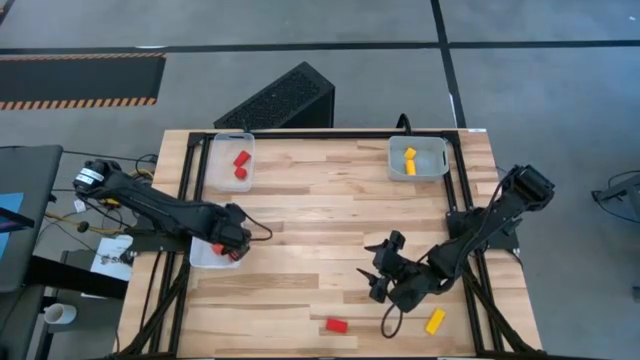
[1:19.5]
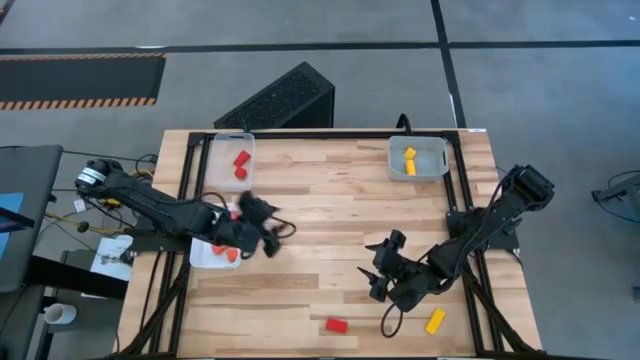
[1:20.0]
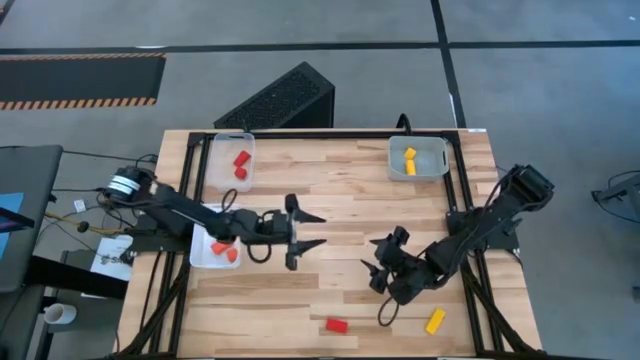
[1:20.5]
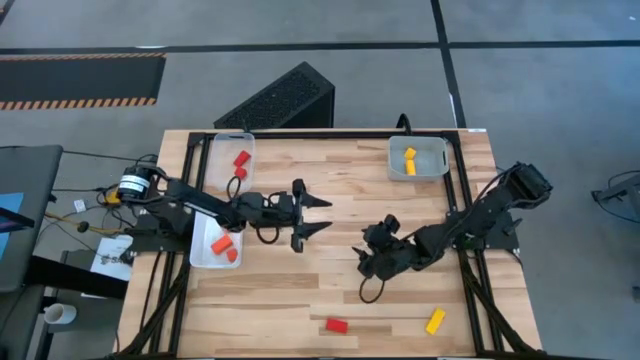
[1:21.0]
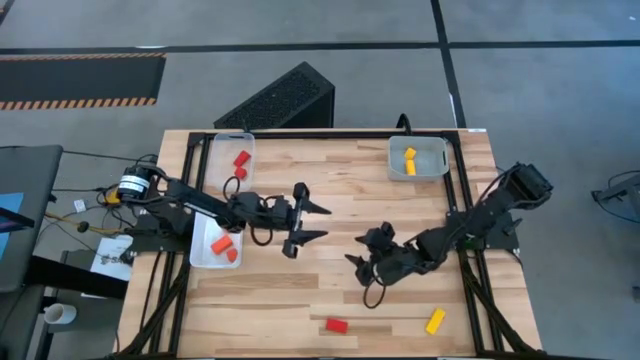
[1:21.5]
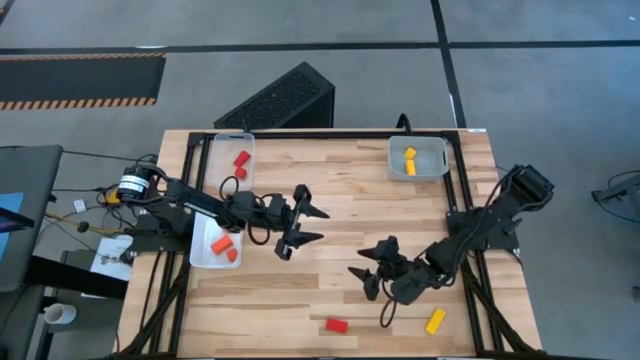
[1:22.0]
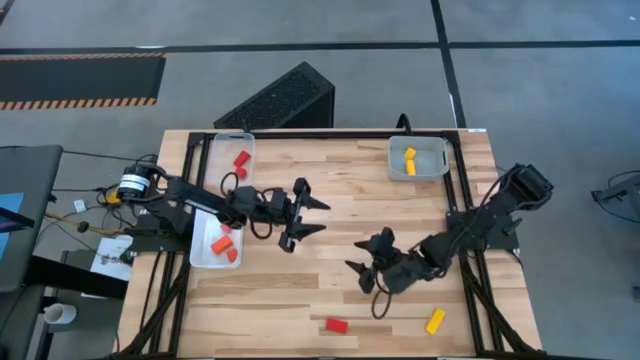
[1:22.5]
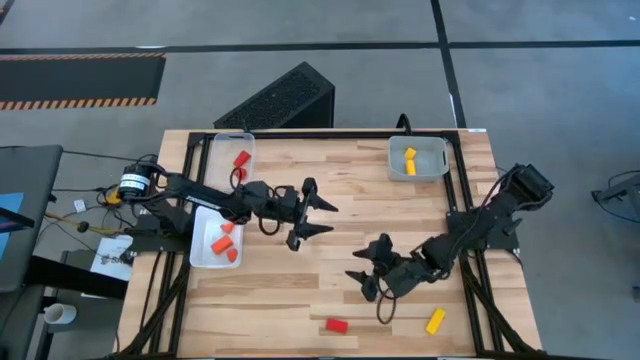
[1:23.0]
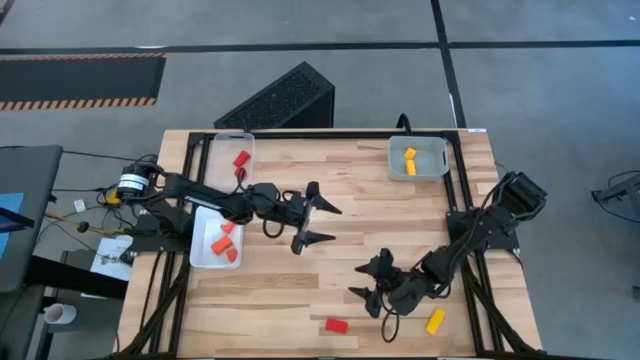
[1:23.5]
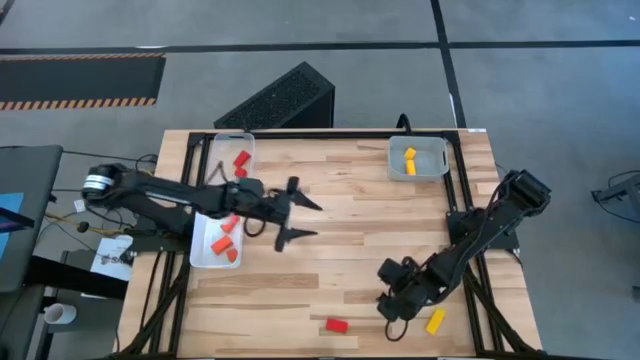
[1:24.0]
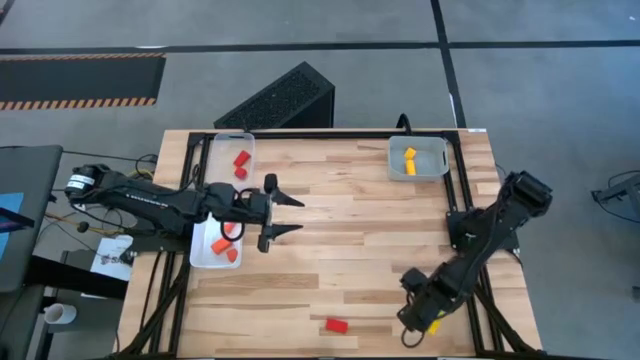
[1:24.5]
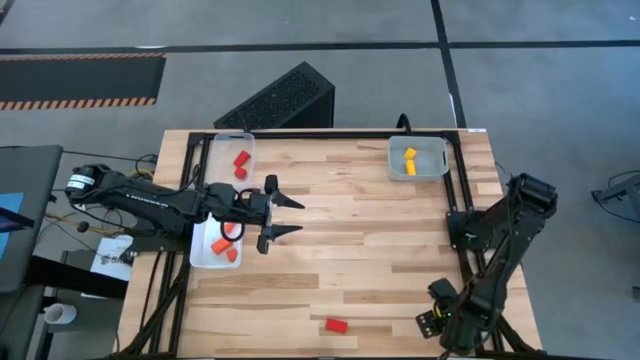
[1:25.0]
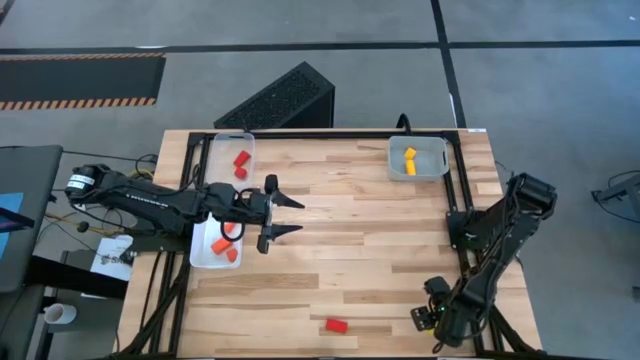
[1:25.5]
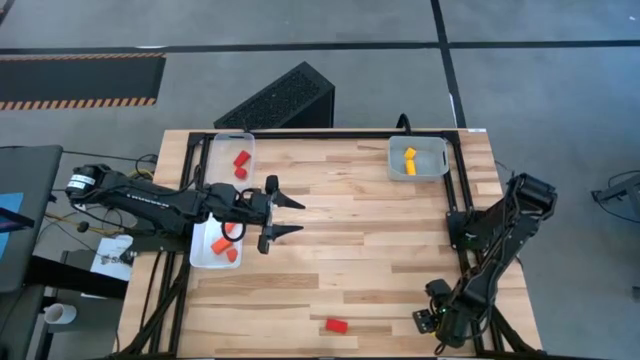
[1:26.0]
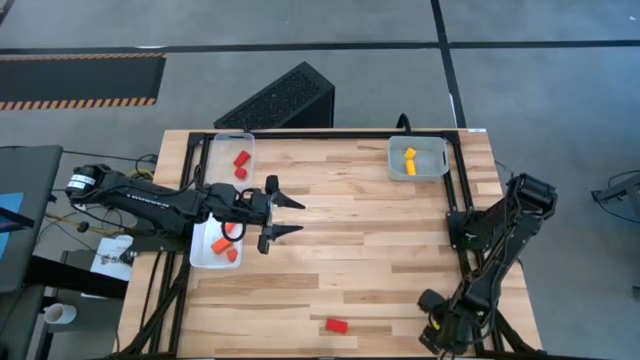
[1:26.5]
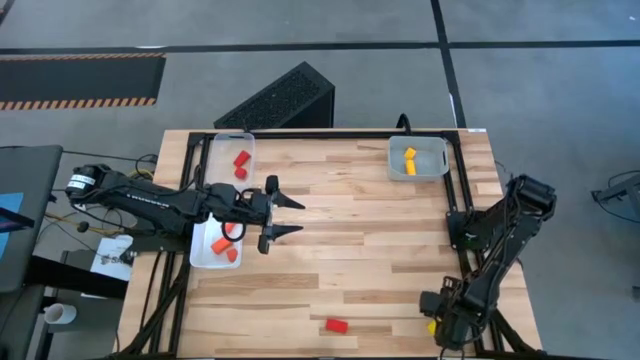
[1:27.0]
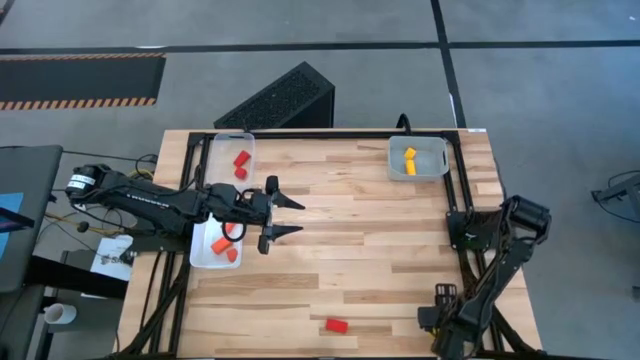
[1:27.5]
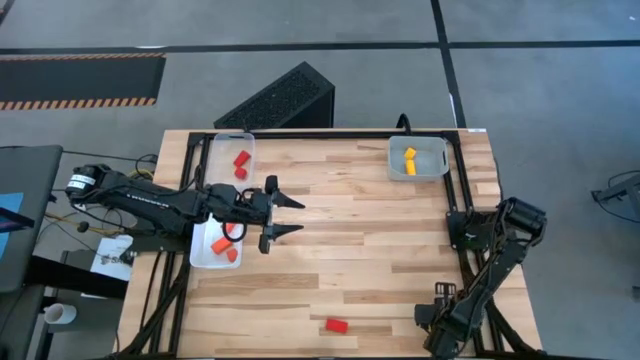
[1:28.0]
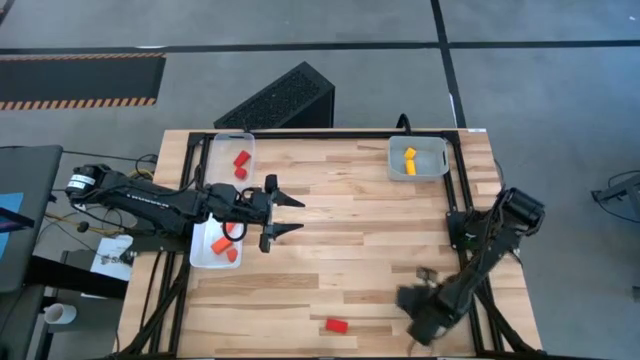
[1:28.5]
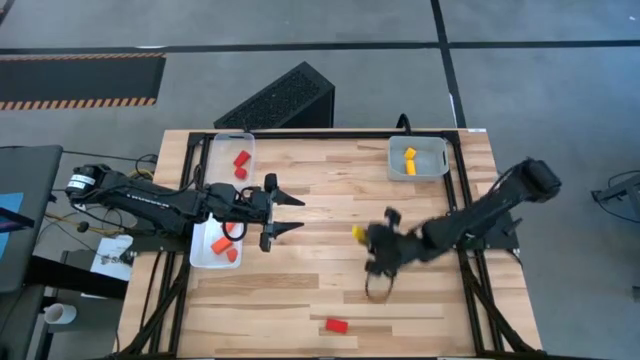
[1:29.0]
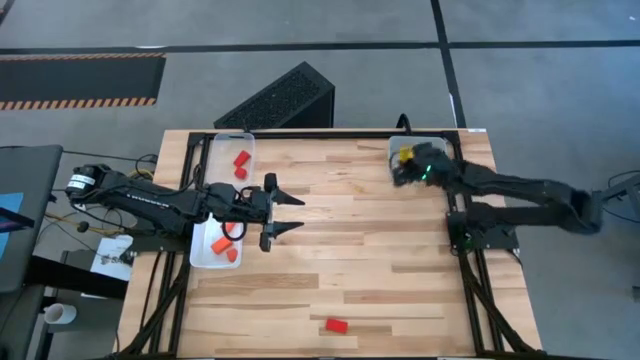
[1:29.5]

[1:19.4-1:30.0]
Task: Sort & place blocks by color
Put the yellow block into the gray bin

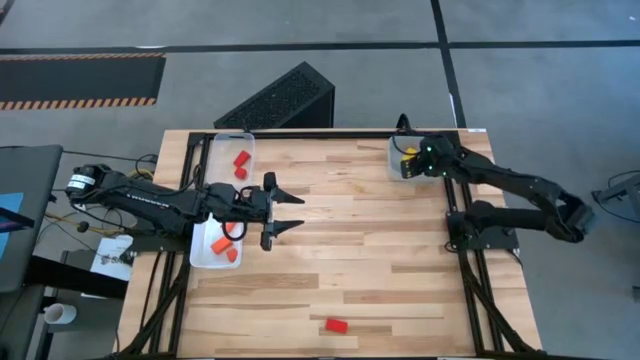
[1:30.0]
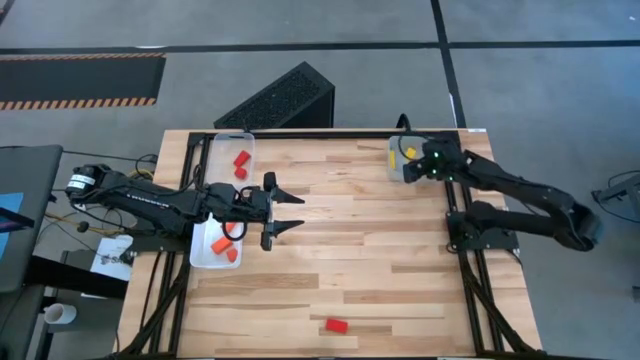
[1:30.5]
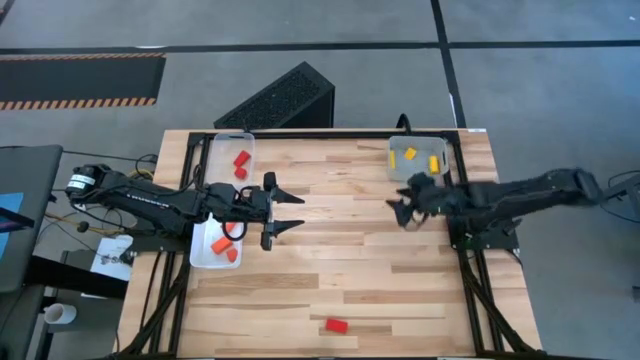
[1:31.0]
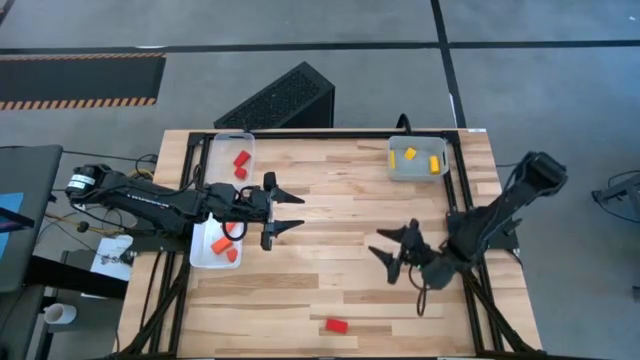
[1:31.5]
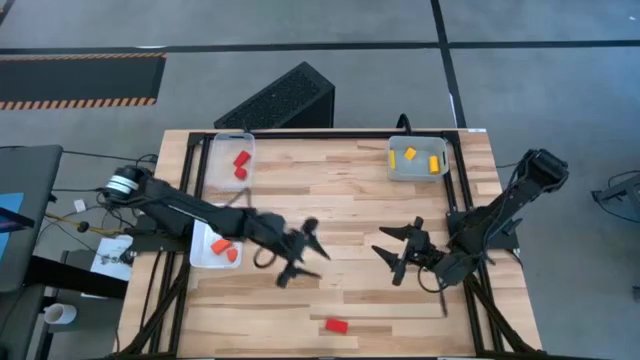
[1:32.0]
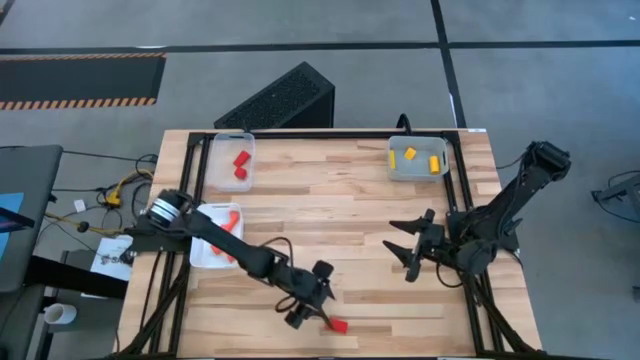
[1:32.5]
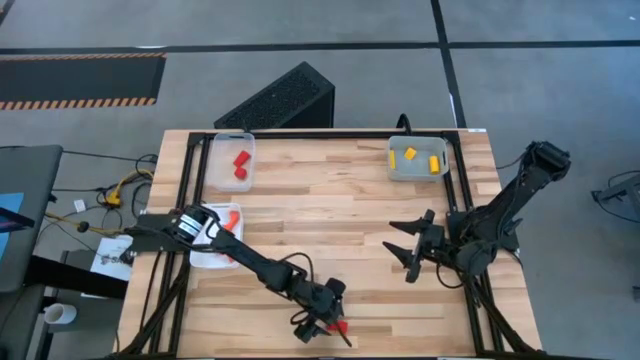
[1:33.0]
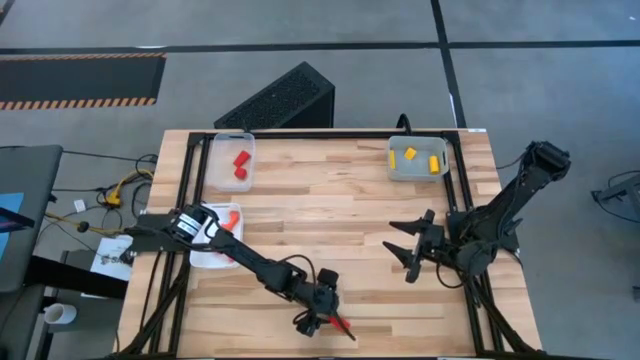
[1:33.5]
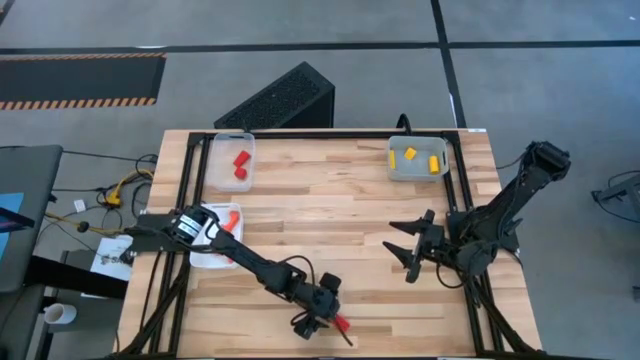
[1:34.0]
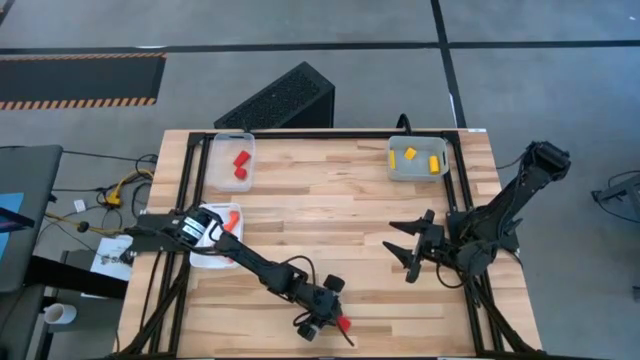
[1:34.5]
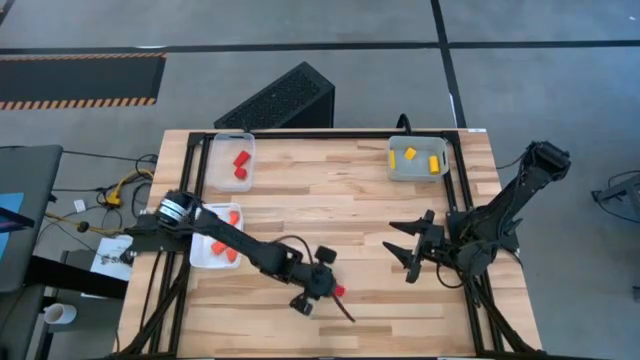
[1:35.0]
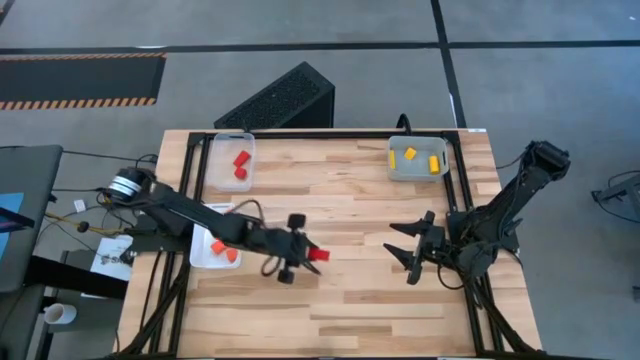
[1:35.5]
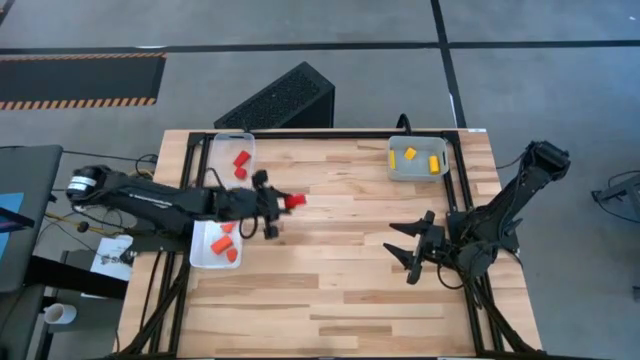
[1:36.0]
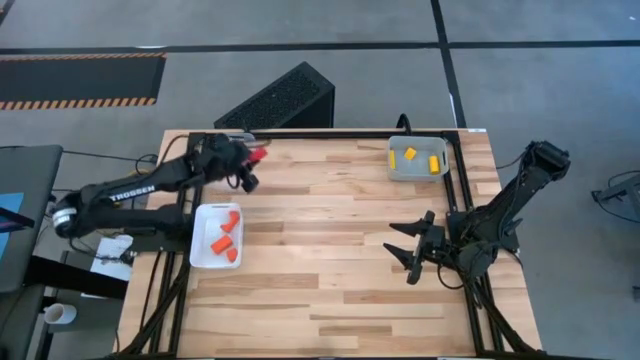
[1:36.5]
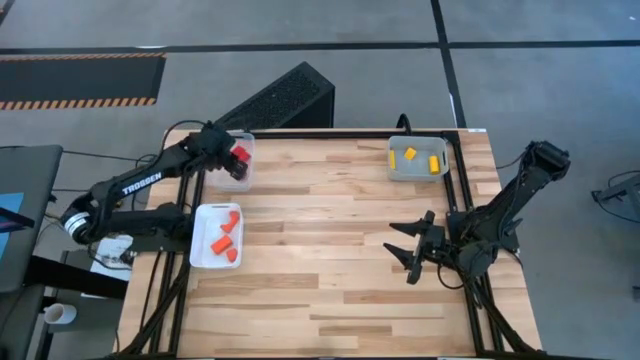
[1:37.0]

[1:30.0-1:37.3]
Put the red block into the transparent bin

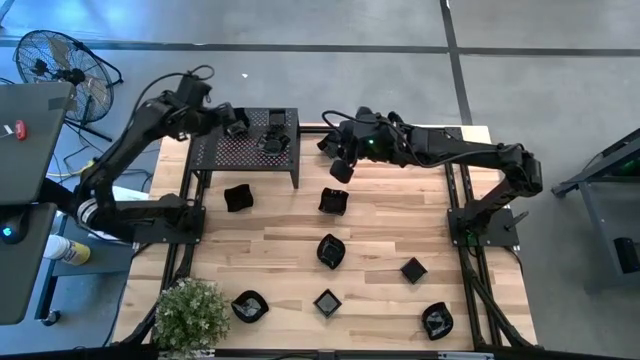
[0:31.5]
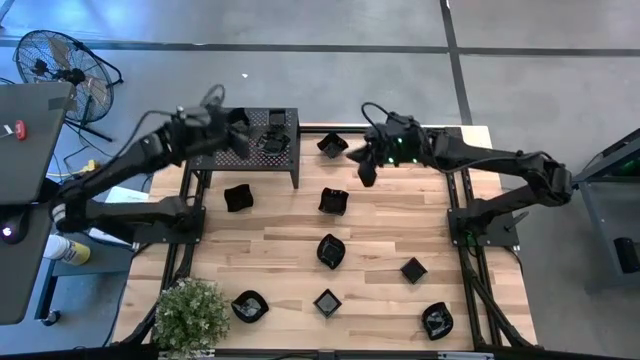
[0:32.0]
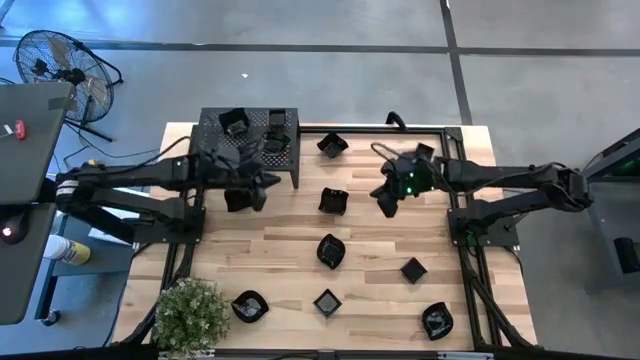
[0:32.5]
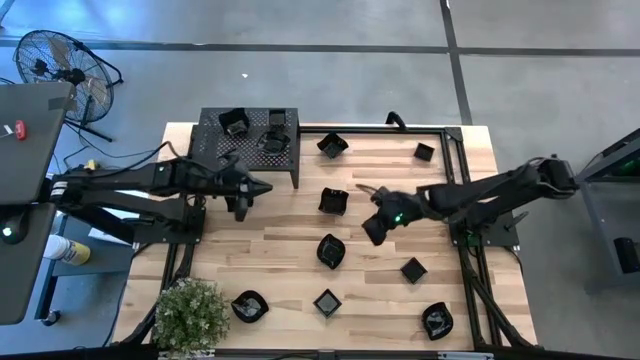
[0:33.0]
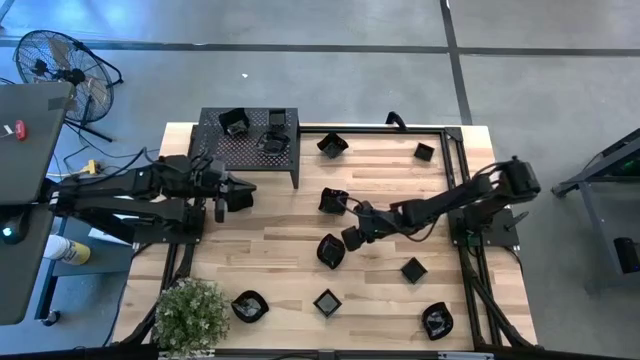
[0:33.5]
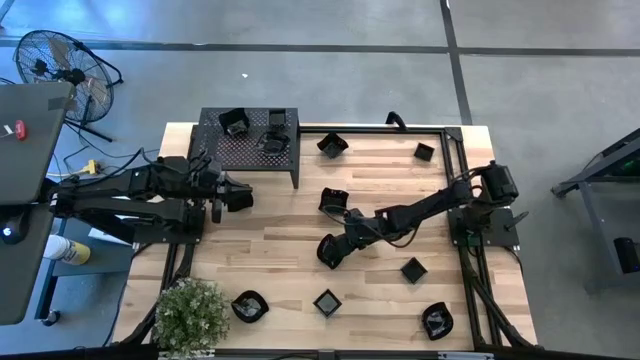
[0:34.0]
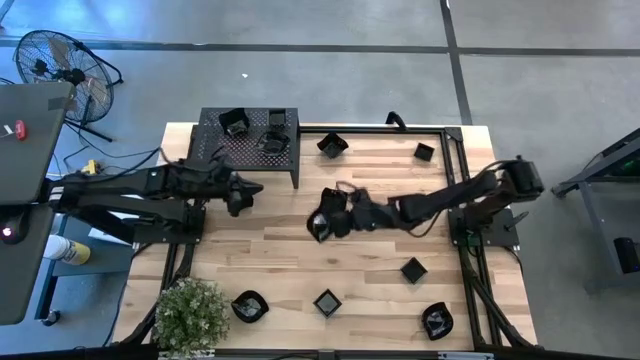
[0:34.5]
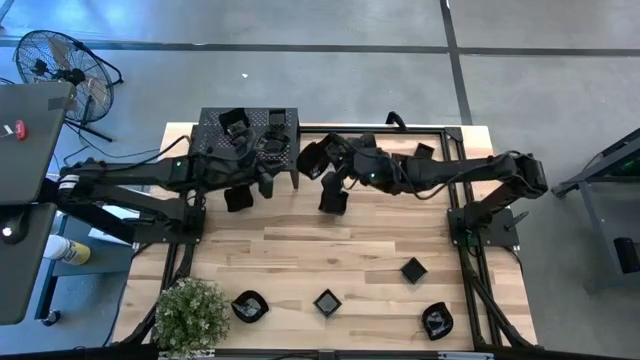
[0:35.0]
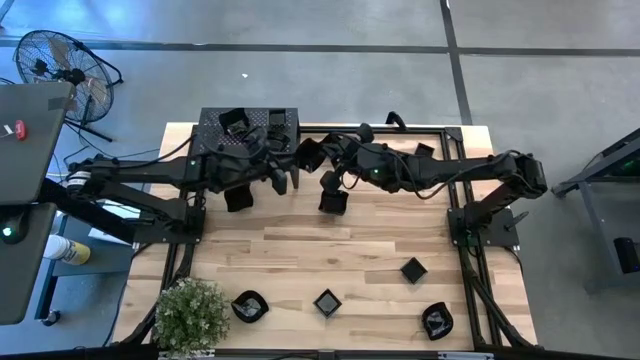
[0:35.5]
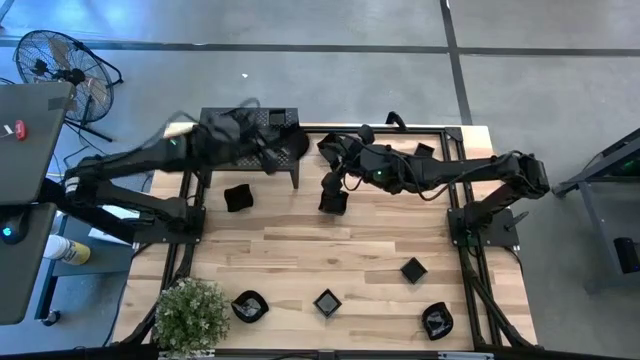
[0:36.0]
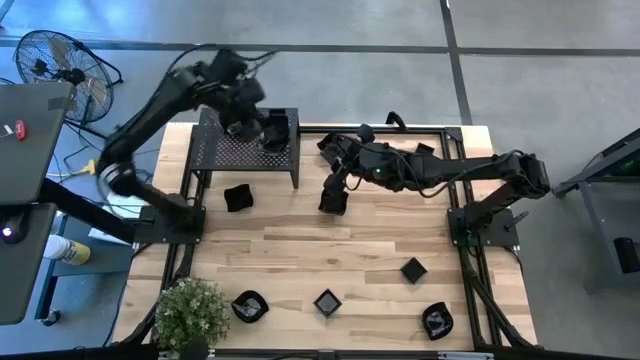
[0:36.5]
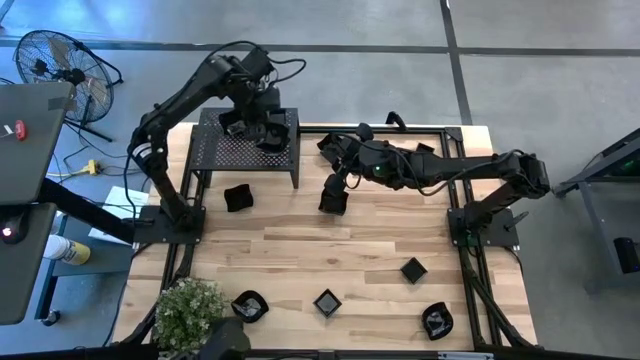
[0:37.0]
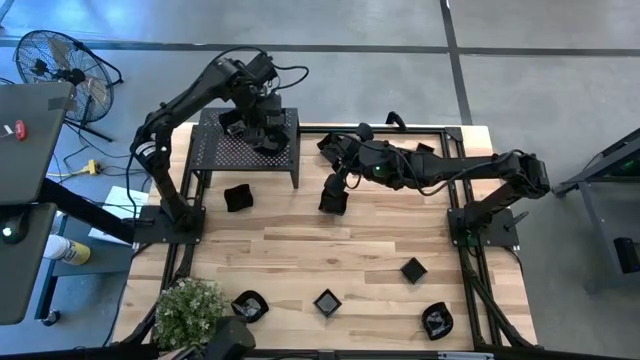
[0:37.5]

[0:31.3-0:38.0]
Task: Pick & Place Mini shaped plates
Stack the leaf-shaped plate on top of the other leaf-shaped plate on the shelf
